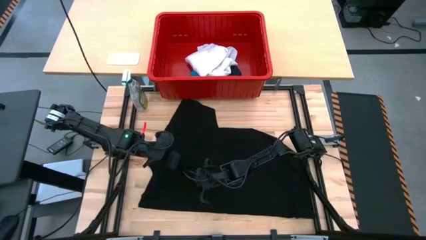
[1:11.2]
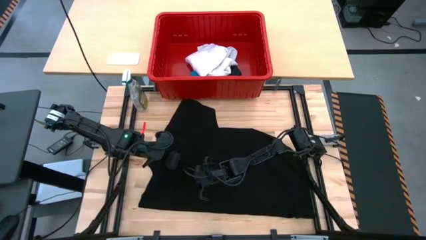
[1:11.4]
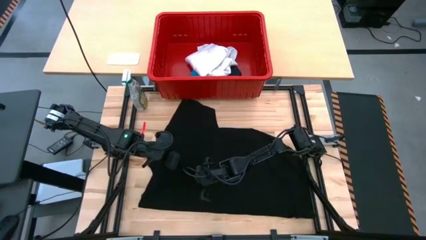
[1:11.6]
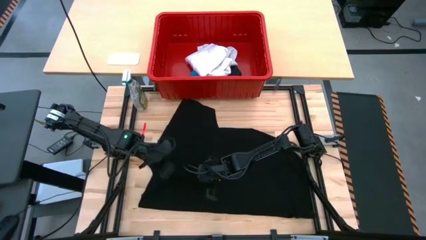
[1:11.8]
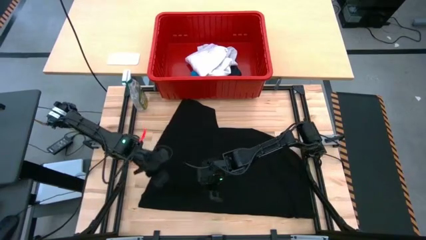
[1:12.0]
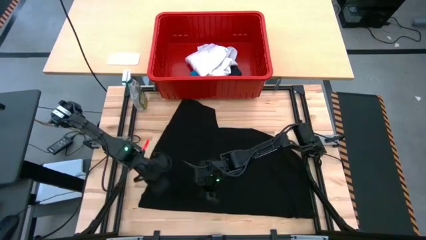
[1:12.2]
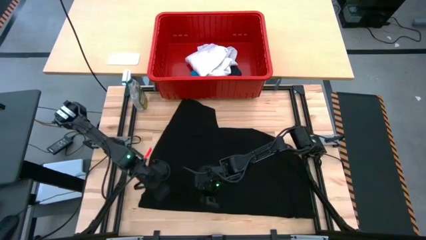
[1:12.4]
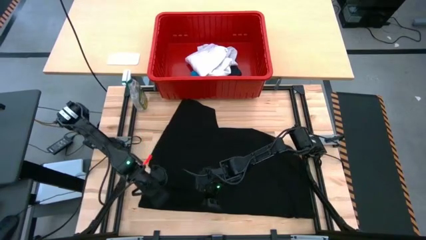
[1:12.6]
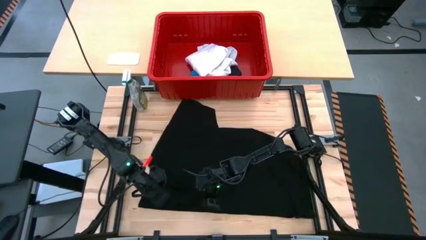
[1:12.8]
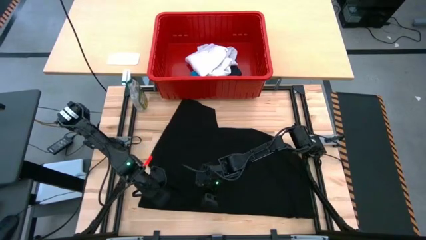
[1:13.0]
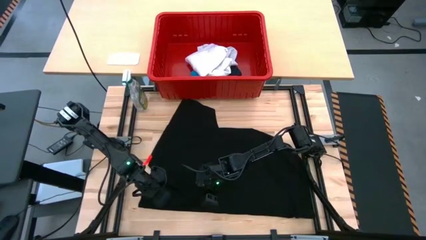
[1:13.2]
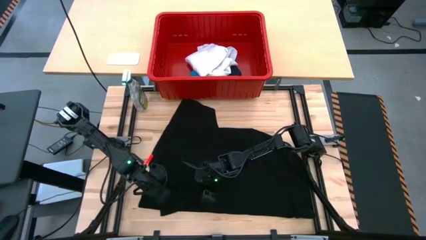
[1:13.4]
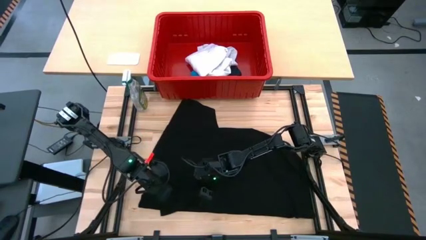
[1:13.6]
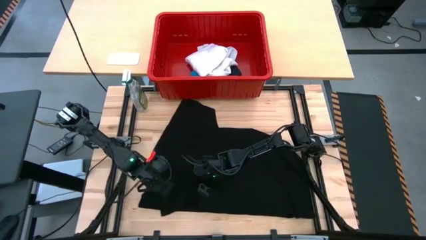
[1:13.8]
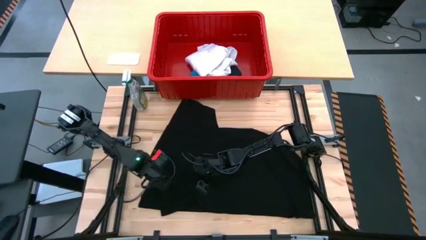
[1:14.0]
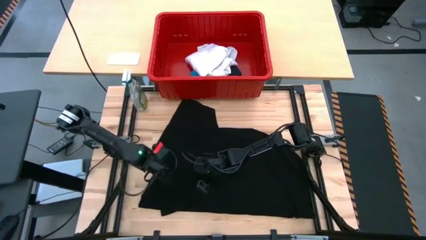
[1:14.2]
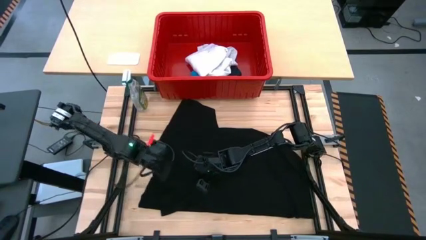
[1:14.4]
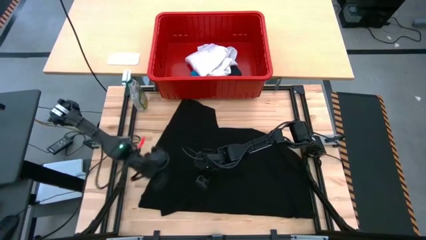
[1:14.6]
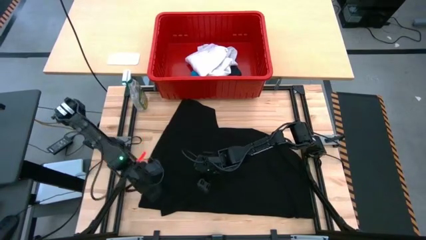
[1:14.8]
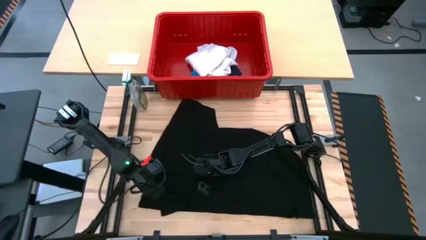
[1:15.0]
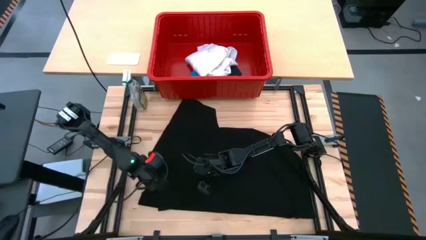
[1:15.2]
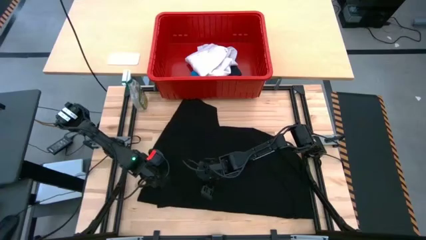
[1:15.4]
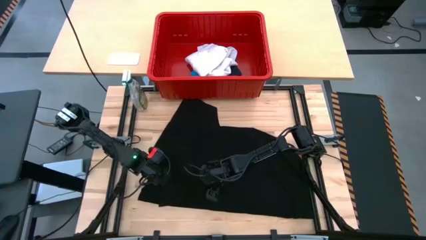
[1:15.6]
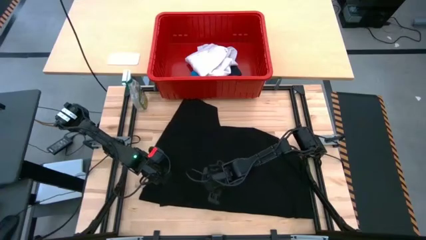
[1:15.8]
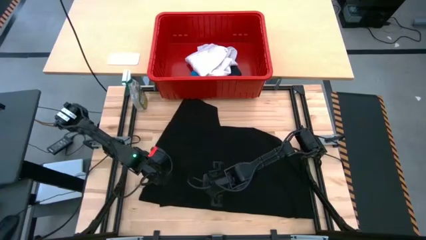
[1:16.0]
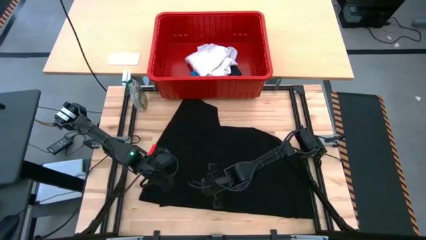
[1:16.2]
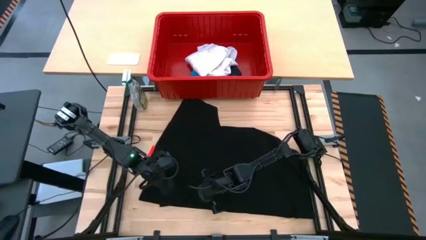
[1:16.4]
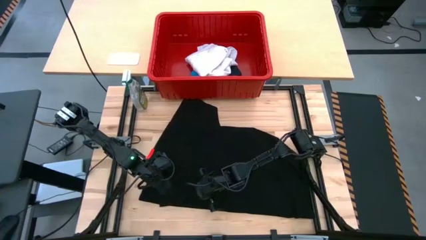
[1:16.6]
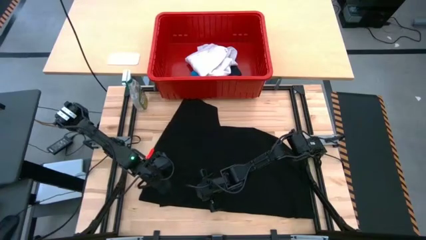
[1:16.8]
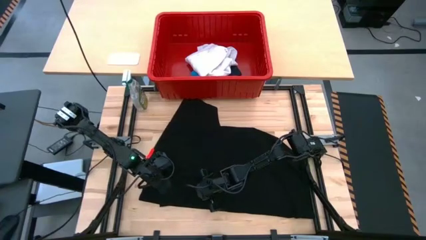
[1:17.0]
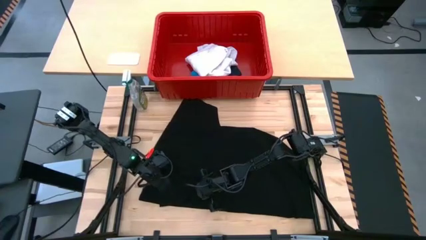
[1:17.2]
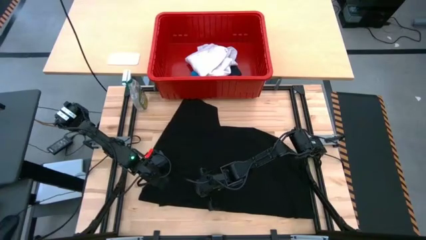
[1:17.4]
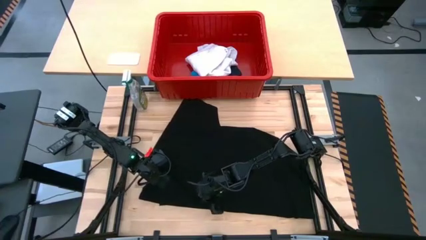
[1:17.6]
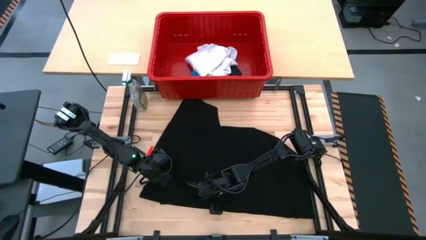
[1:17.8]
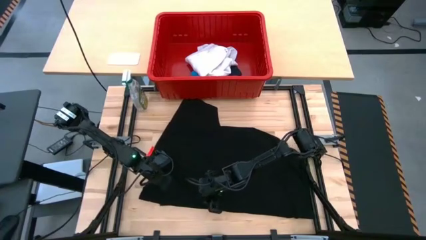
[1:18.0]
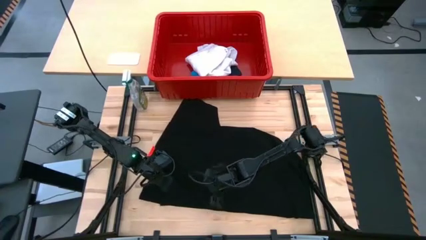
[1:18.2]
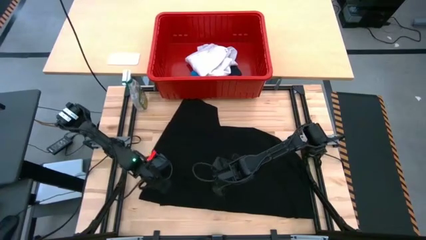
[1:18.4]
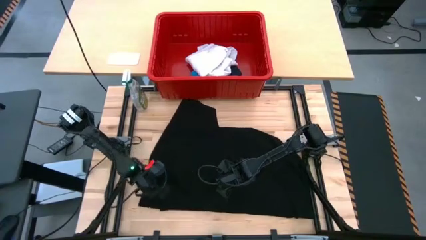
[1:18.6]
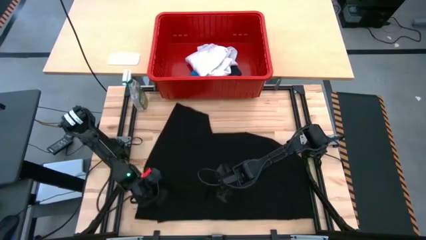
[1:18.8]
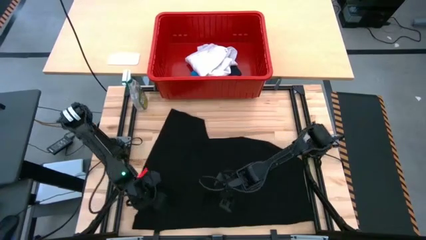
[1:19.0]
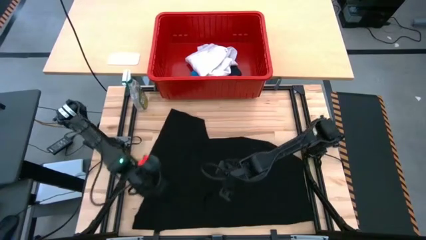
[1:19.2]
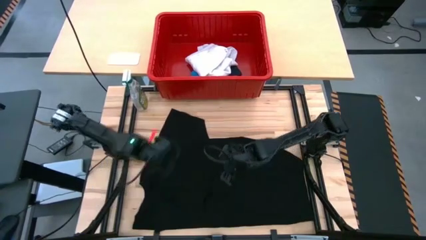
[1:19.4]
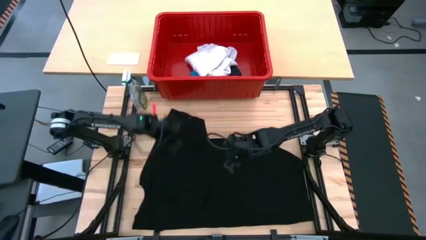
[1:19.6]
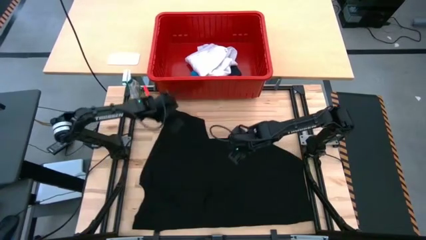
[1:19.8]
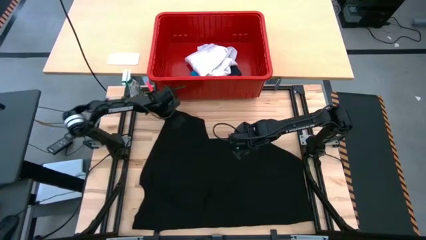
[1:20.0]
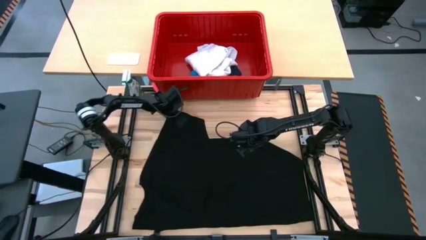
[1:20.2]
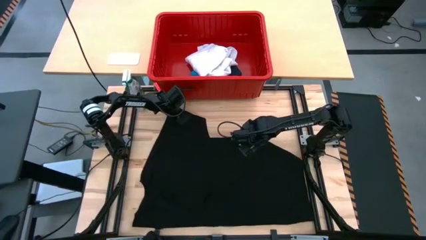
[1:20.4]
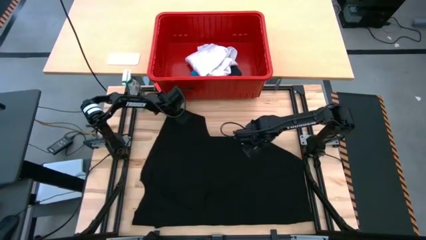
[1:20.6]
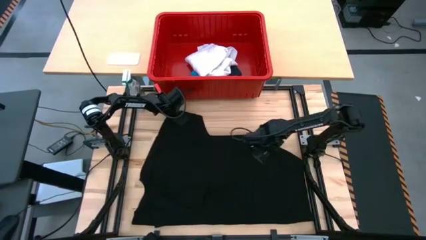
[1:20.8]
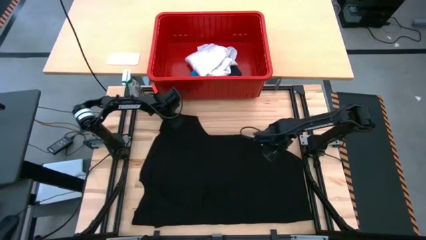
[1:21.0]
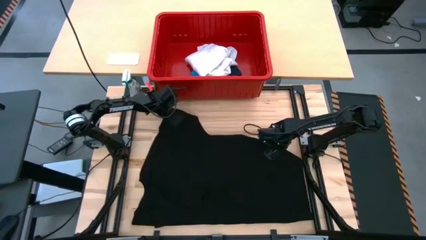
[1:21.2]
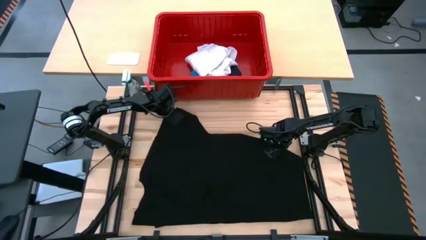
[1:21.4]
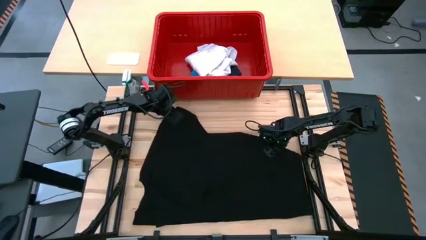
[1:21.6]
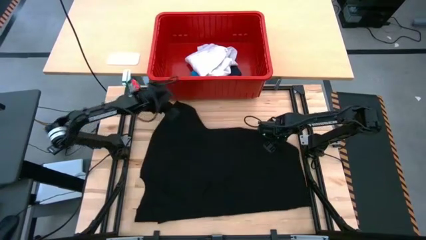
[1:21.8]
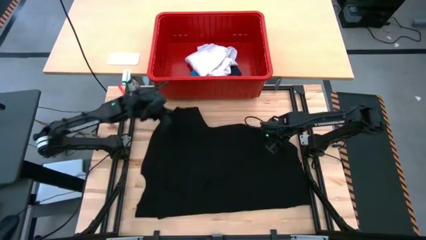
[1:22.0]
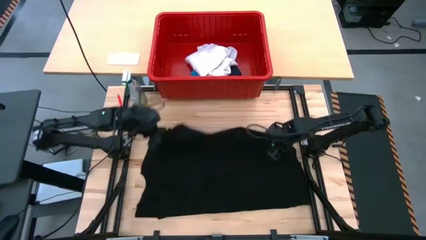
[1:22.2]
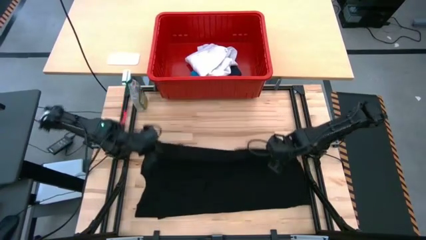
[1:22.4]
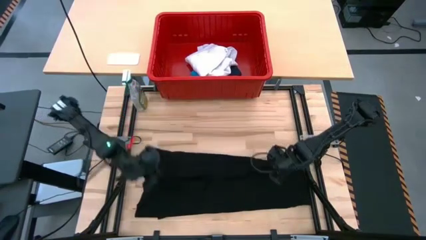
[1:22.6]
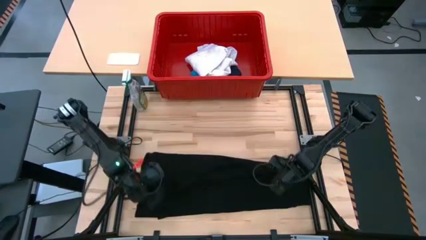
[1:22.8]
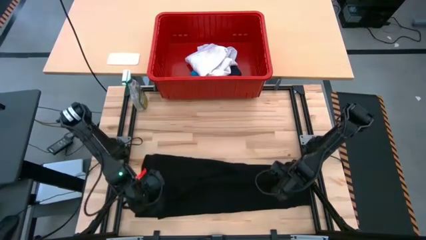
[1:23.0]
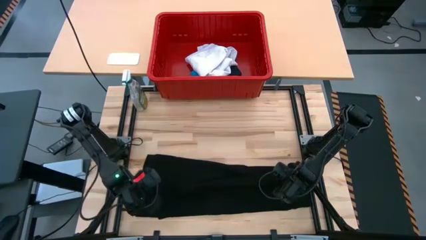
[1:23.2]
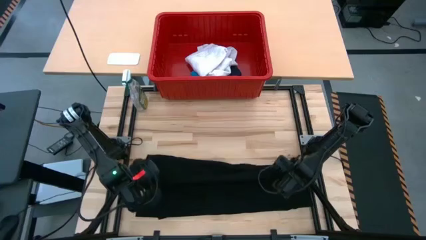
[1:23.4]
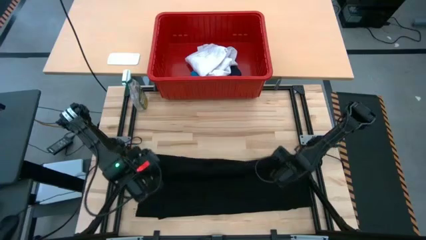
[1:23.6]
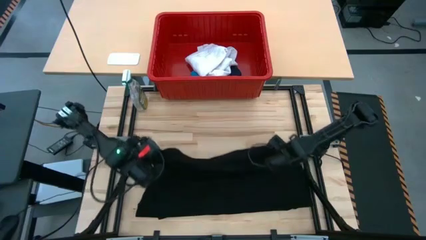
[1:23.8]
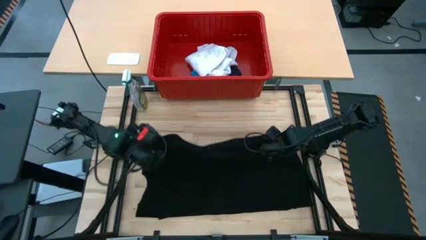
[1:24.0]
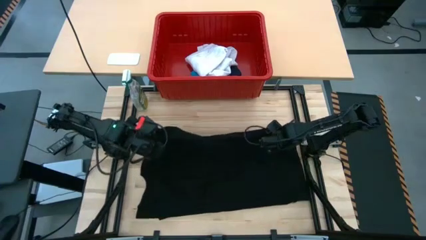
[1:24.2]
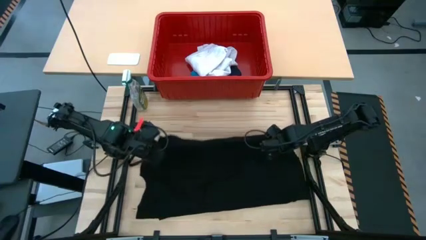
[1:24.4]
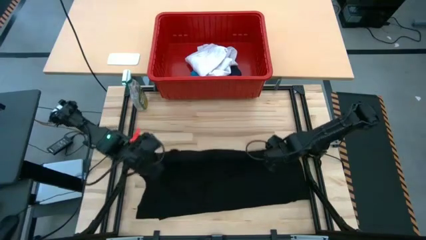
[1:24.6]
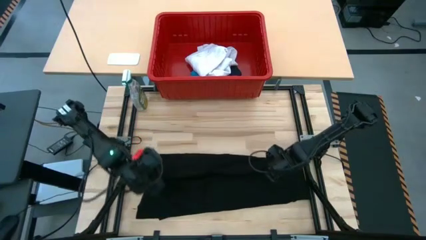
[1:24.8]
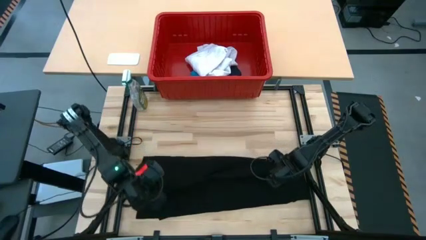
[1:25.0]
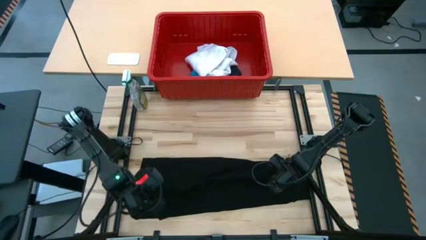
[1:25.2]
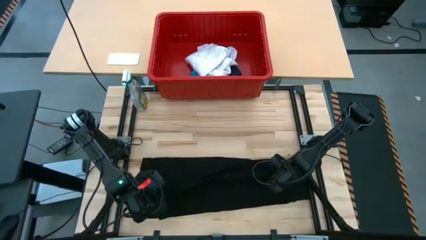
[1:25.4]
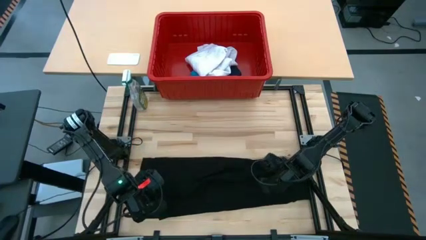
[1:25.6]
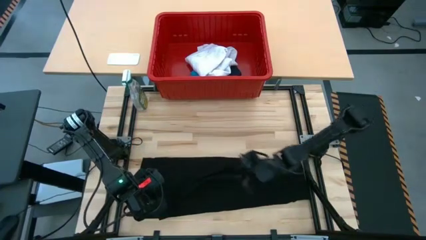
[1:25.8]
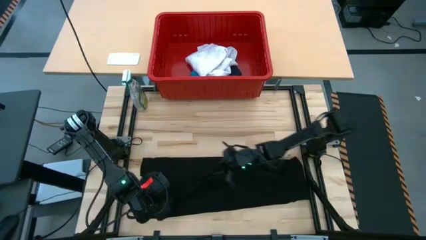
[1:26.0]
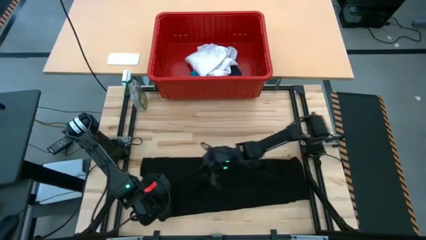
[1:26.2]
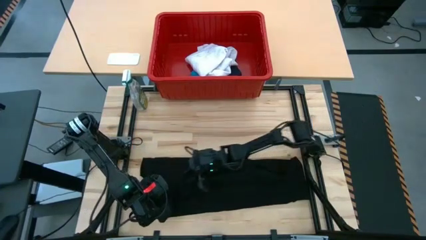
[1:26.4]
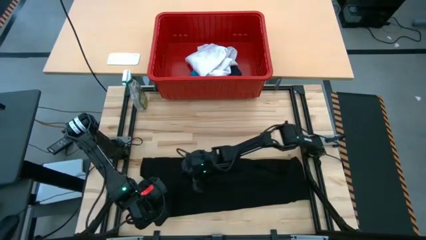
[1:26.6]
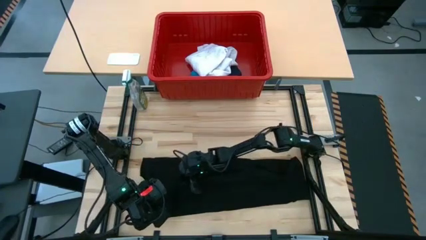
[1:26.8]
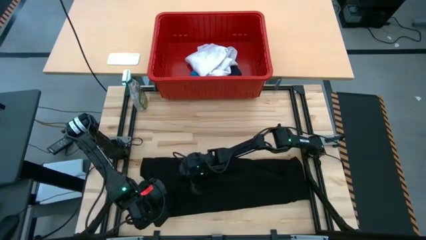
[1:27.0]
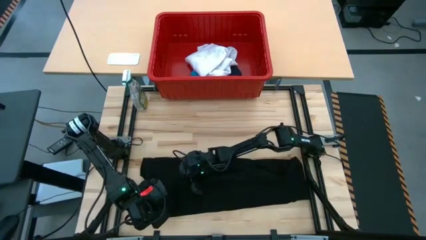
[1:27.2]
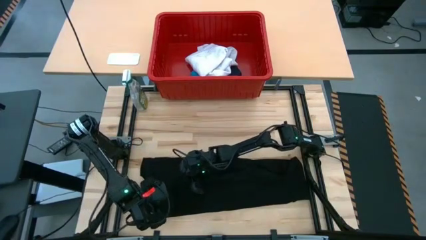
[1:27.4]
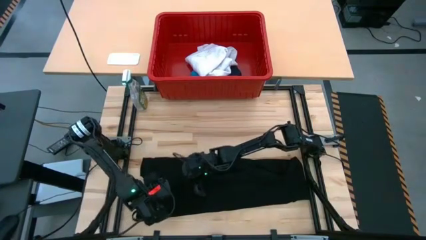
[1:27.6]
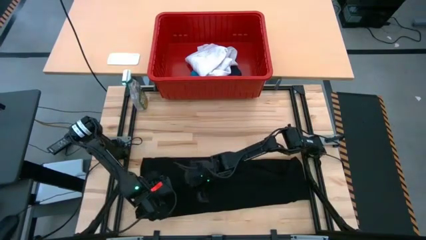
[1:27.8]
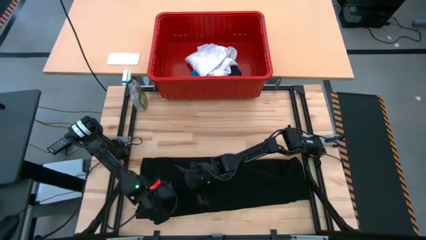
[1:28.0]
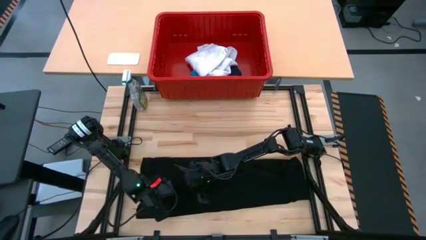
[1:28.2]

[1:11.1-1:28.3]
Task: Fold laundry
Fold the black shirt on the table
